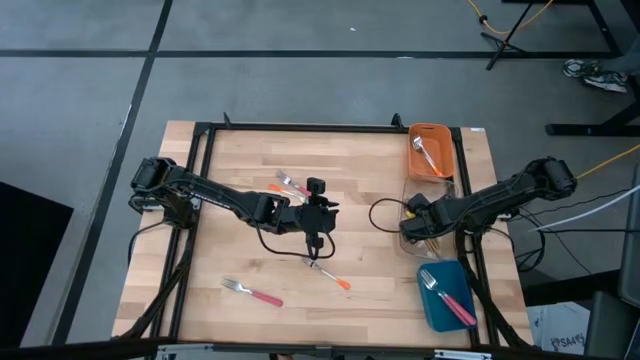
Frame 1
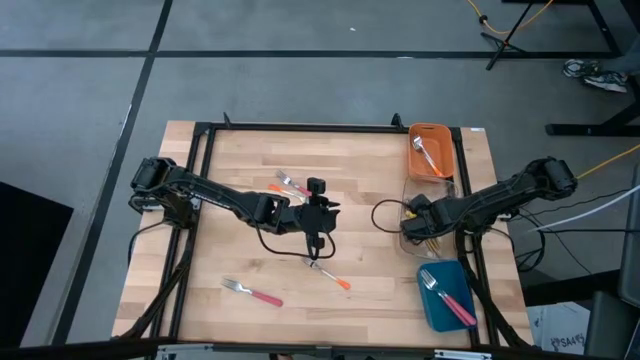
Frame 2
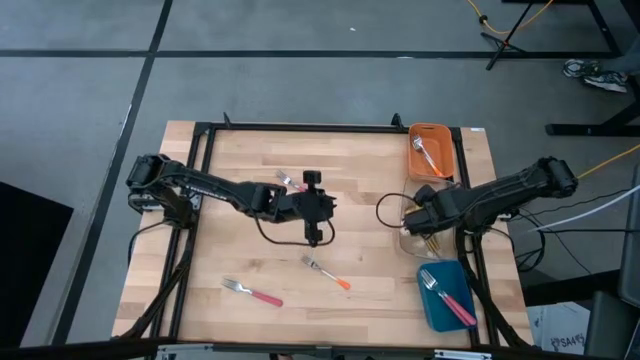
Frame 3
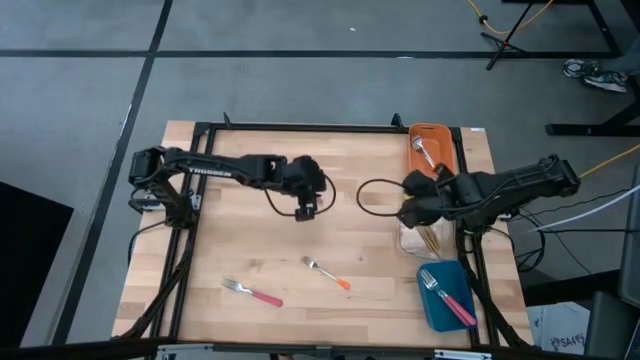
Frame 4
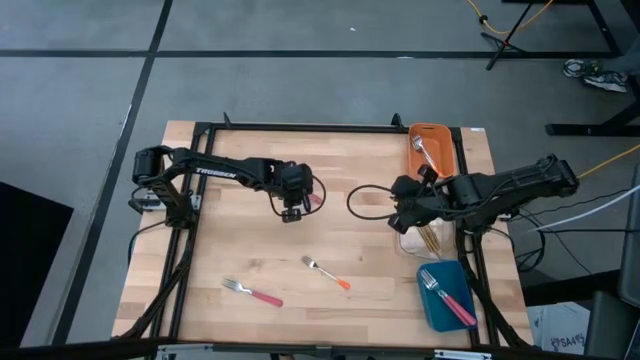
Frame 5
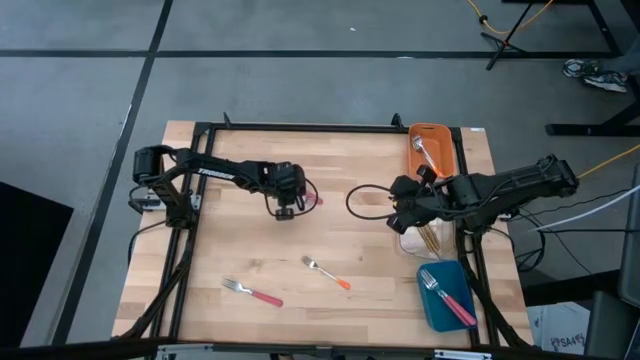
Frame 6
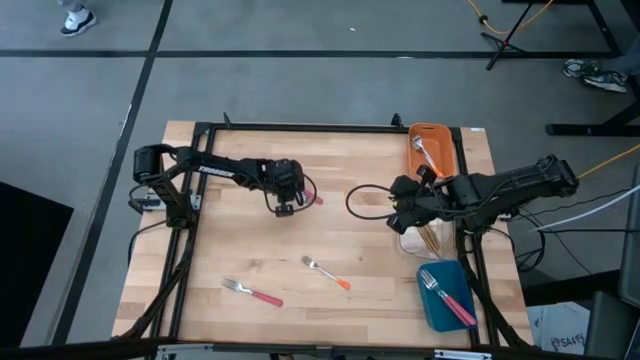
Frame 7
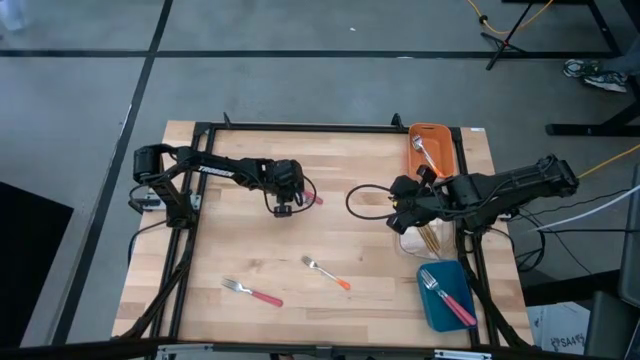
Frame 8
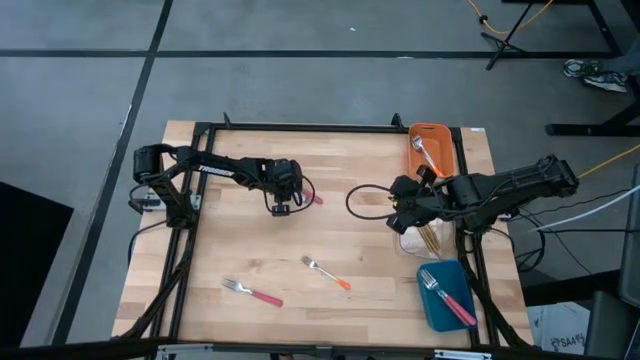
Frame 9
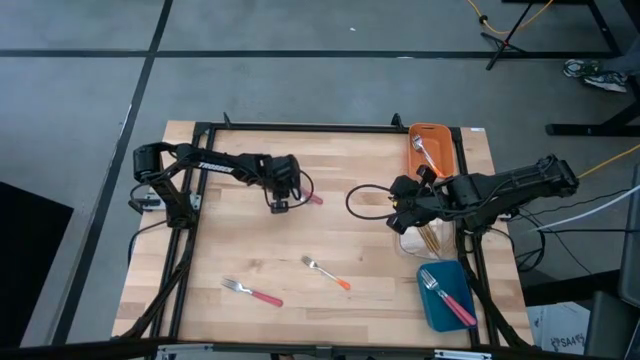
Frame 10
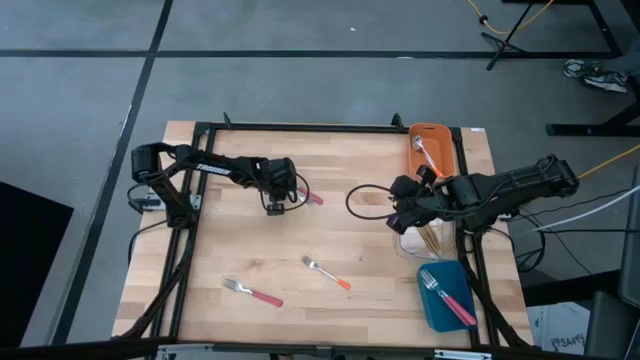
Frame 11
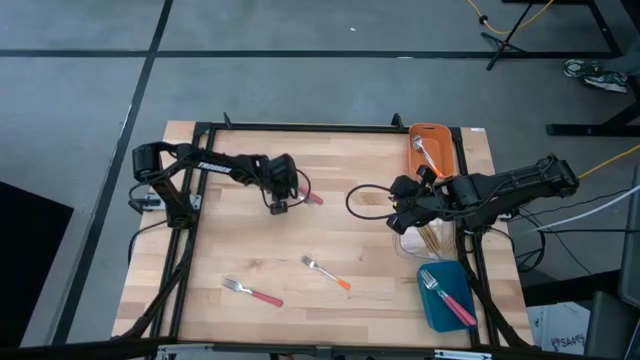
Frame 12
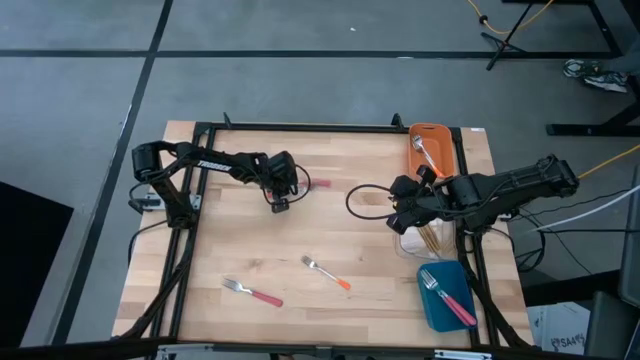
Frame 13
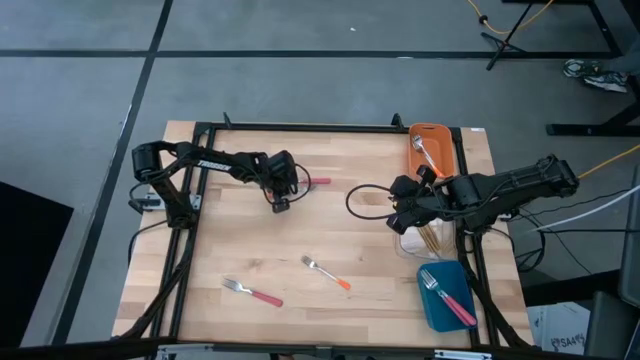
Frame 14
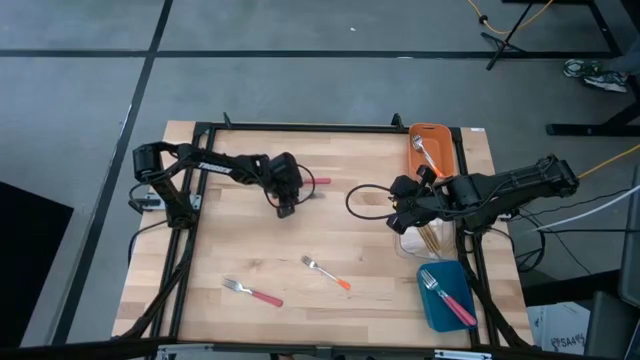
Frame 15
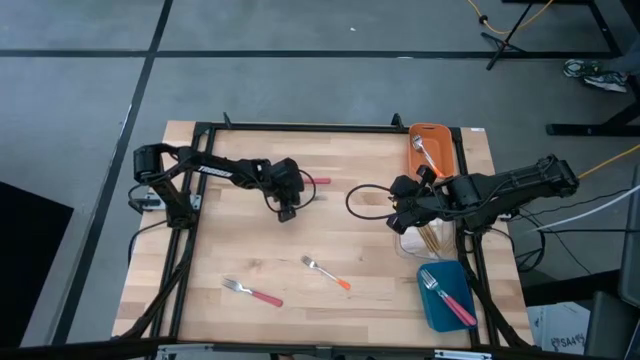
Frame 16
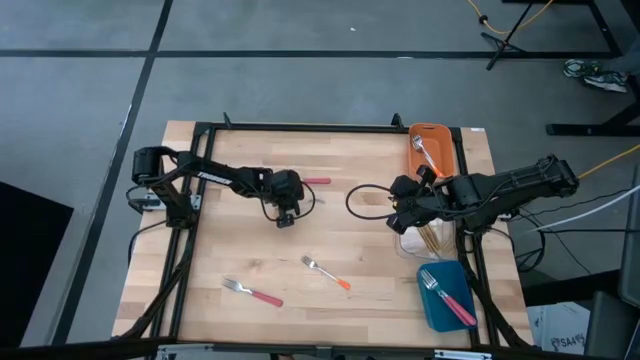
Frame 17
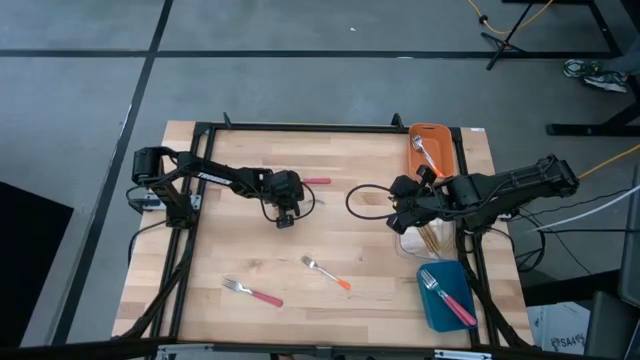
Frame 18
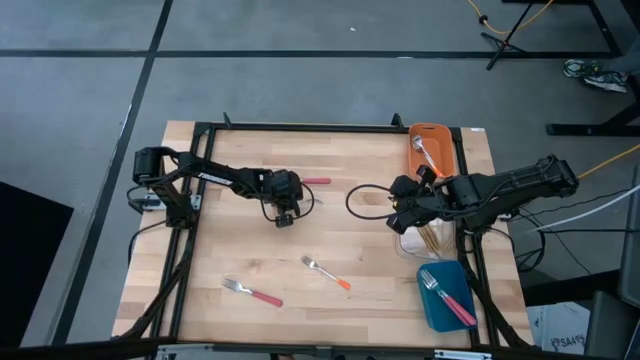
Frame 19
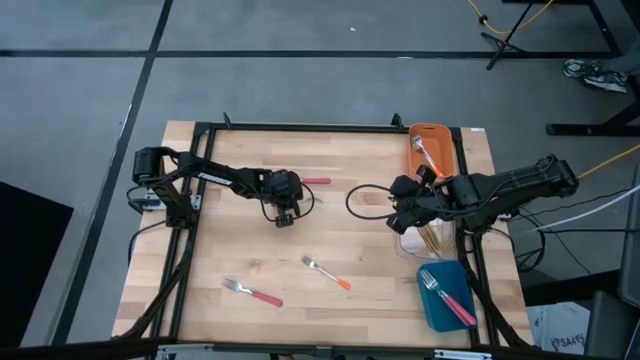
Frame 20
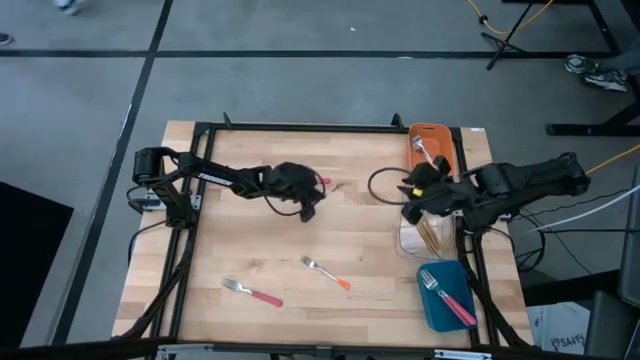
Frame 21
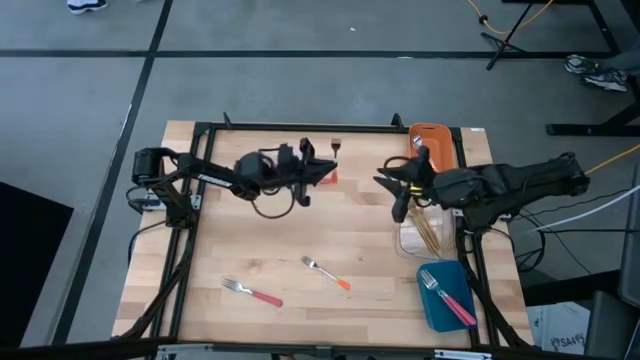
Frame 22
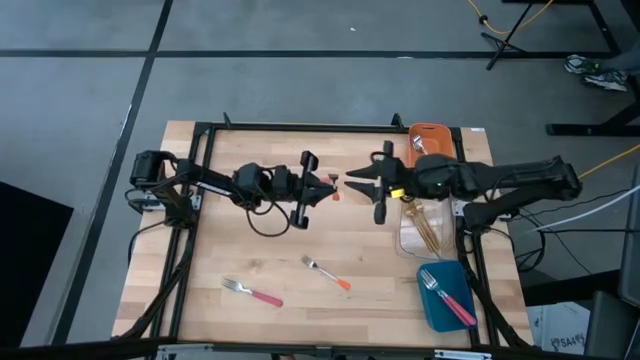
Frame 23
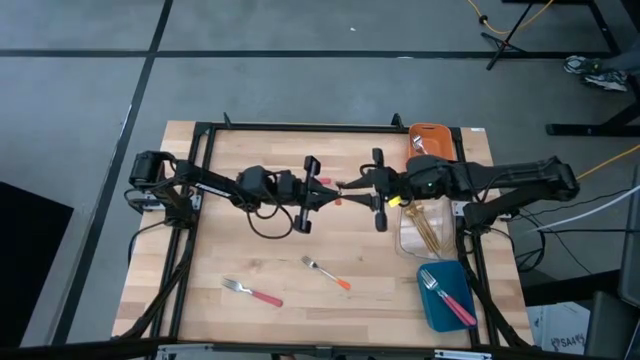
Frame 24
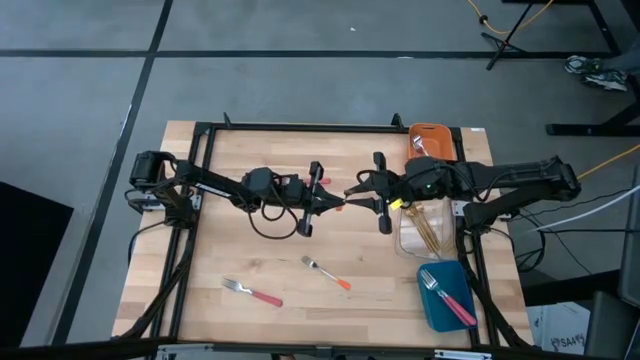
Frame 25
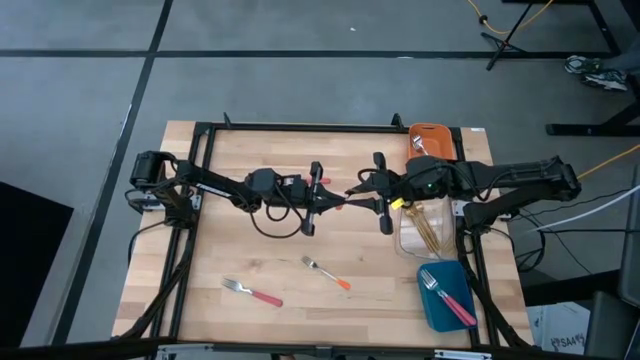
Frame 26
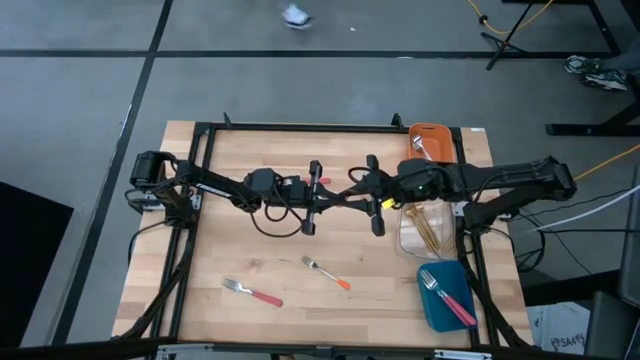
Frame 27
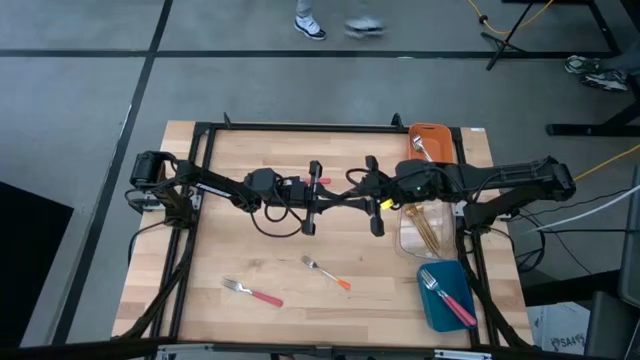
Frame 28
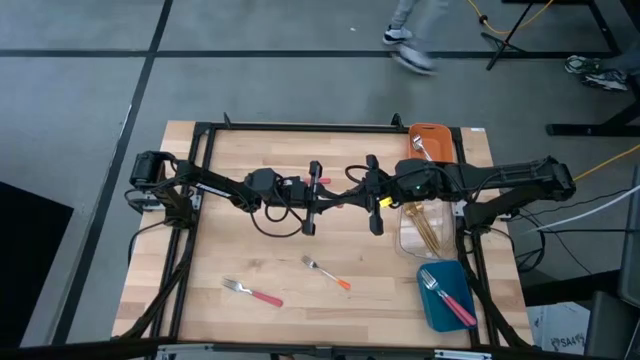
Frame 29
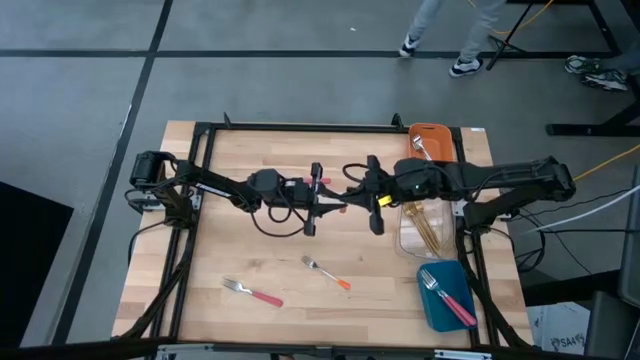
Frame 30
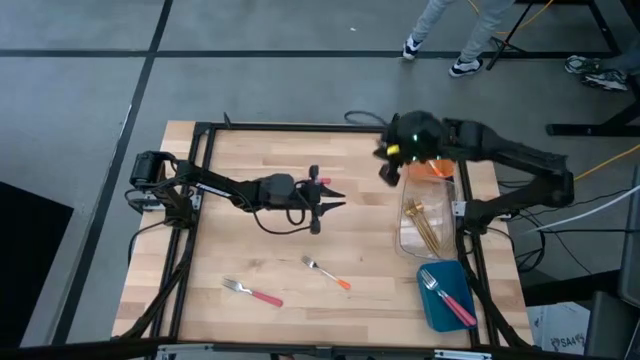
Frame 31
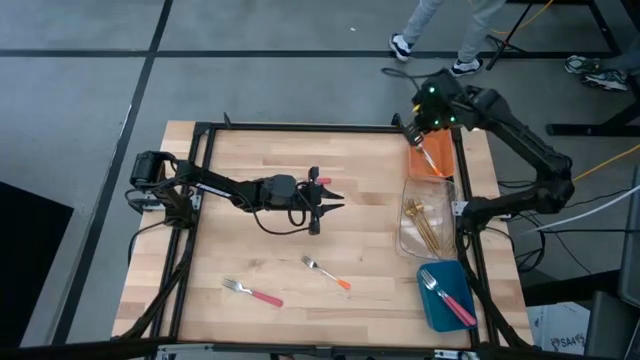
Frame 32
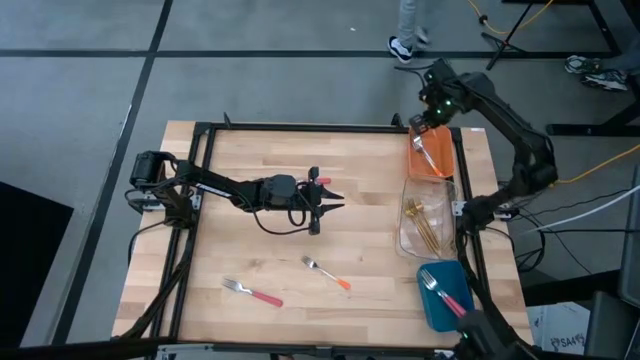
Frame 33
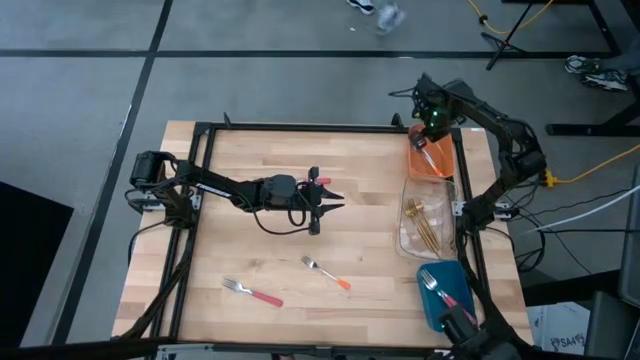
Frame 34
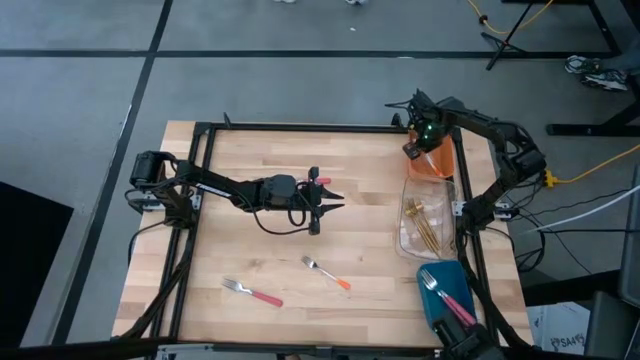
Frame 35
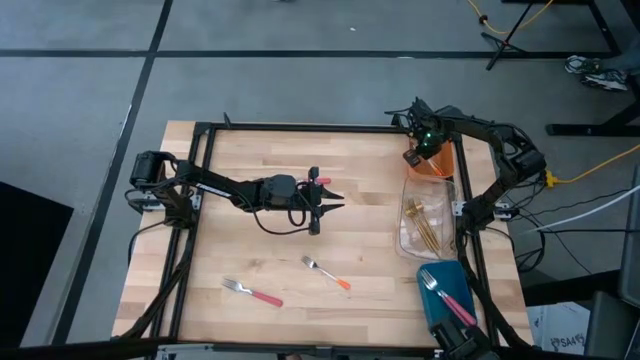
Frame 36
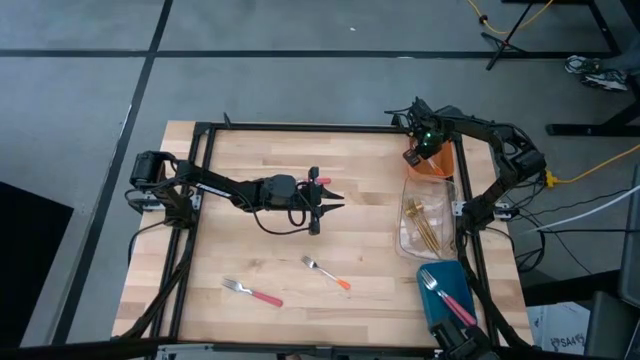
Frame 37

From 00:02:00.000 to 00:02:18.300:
Task: Sort silverware by color (type)
Put the orange fork into the orange bin
